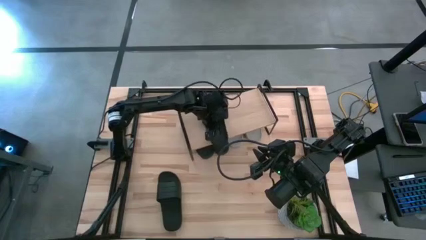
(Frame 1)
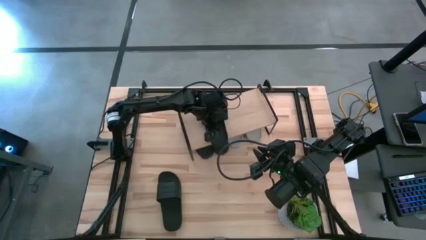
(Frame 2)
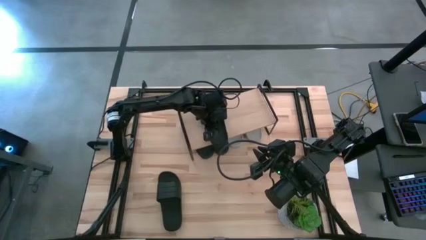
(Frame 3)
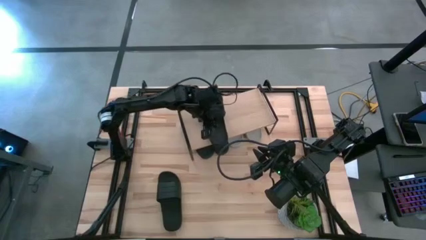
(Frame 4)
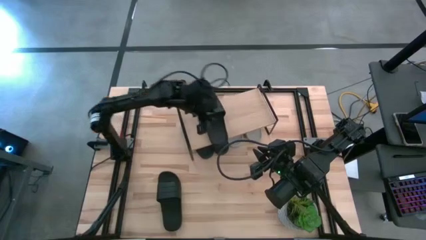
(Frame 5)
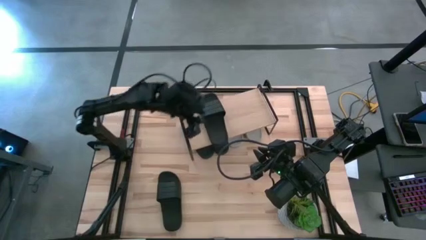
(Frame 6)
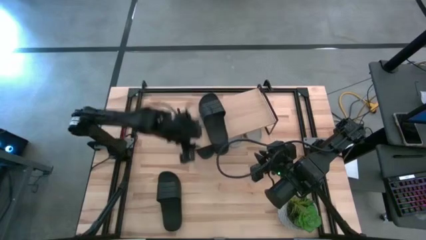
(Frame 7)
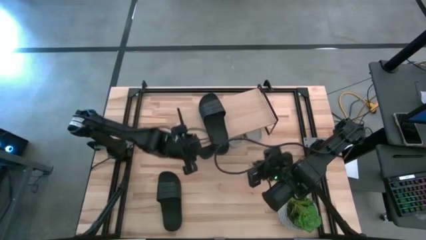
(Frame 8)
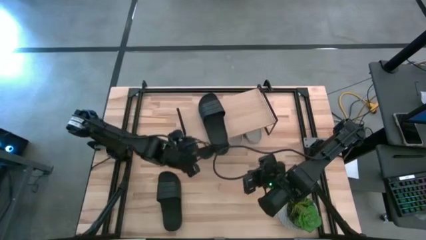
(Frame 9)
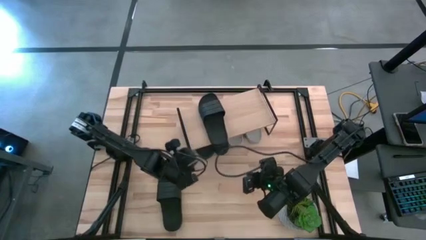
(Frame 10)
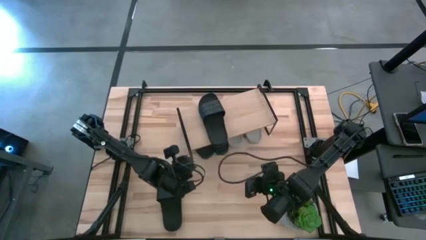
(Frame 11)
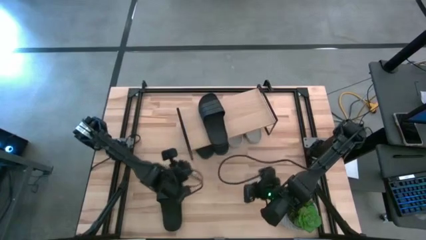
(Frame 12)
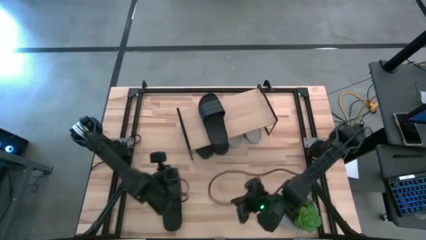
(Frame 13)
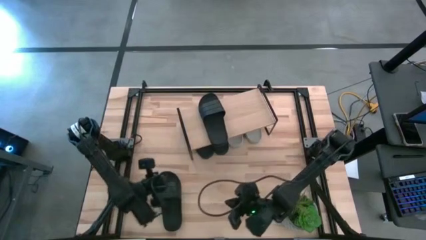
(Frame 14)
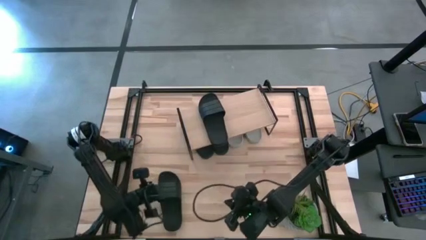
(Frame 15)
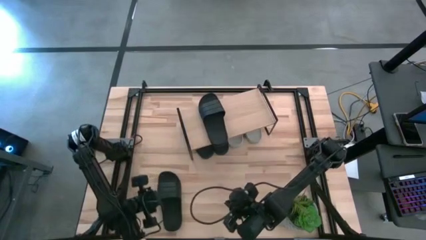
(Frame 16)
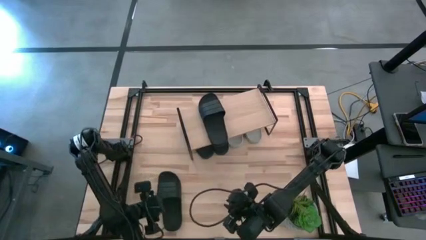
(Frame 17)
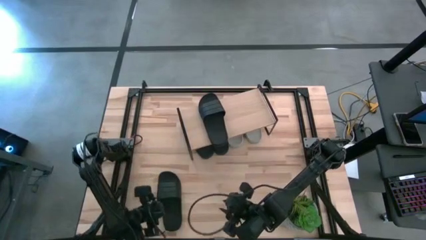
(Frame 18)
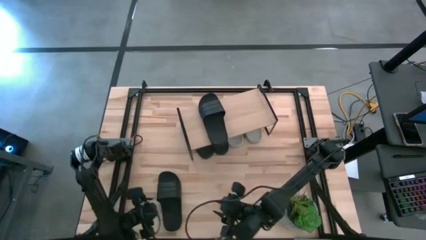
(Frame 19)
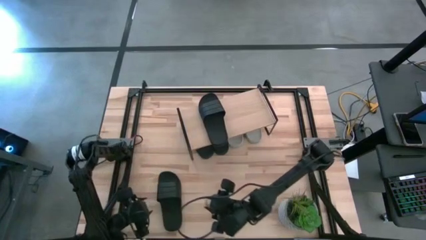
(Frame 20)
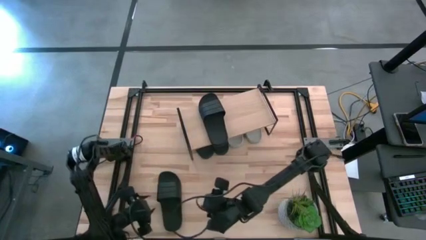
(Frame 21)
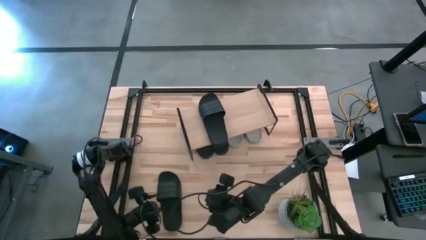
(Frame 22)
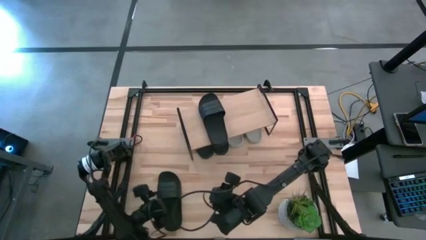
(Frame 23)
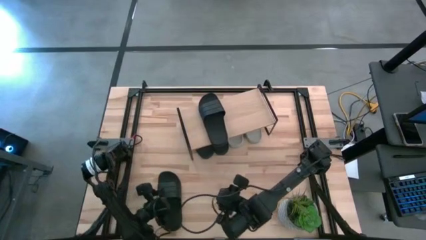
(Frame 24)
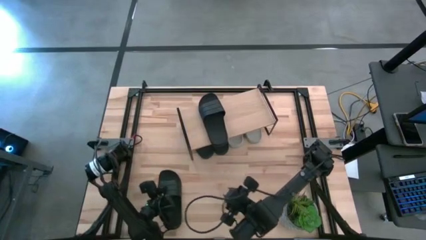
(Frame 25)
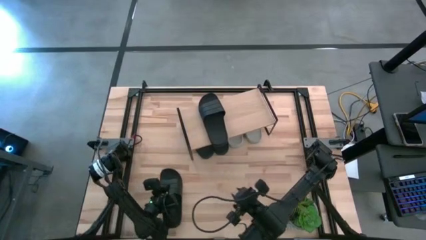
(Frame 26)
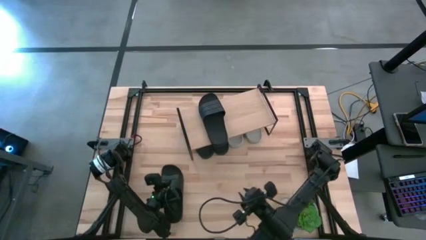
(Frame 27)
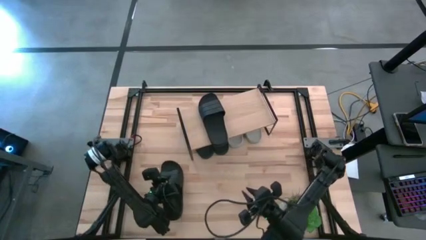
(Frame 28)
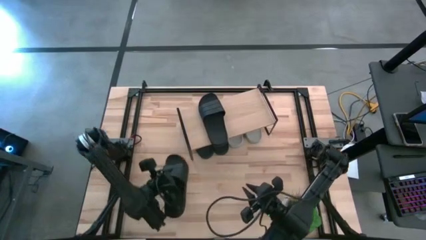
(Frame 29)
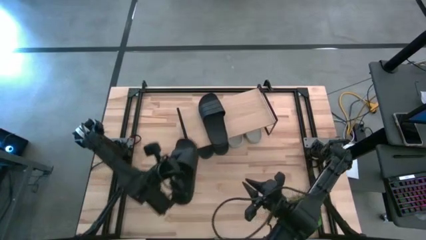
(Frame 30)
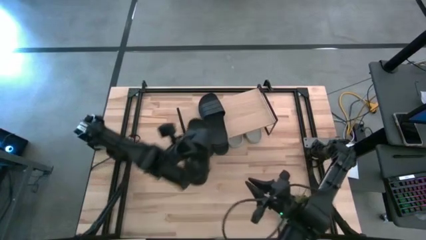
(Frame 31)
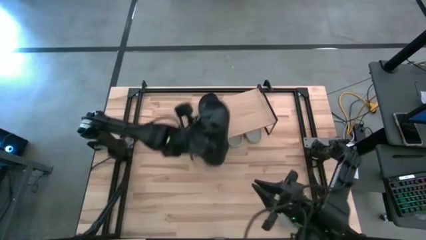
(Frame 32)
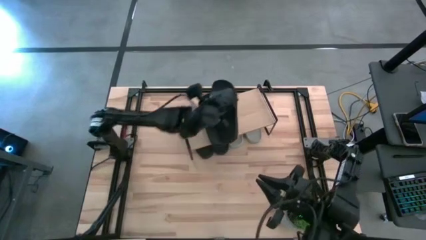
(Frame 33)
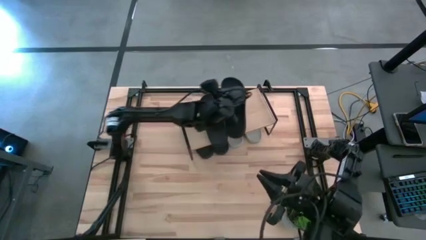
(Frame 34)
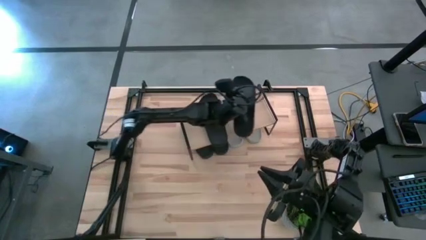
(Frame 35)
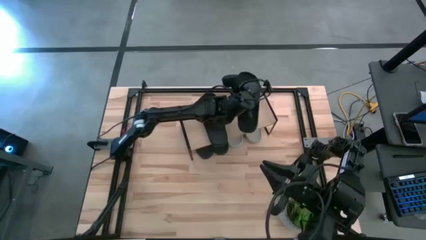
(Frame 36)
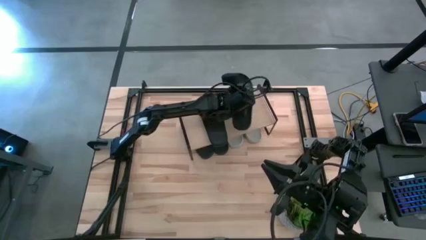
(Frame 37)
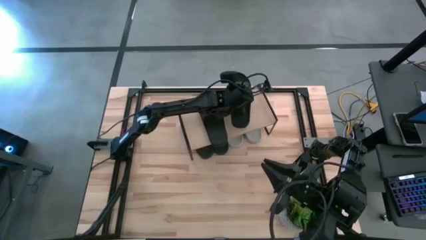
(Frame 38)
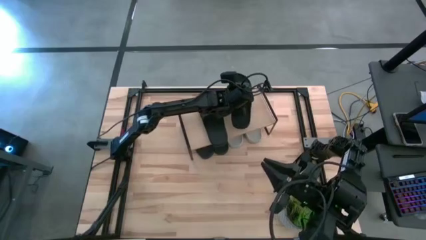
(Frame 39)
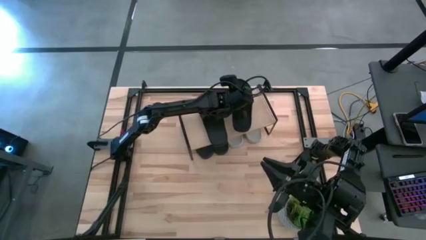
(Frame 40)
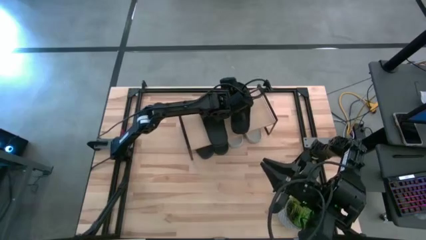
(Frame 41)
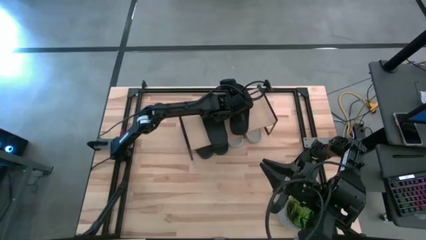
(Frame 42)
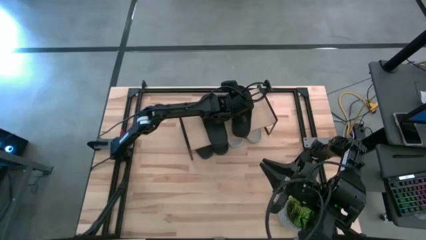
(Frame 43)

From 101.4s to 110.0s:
Task: Pick and place slides into the shelf
Put the black slide on the shelf

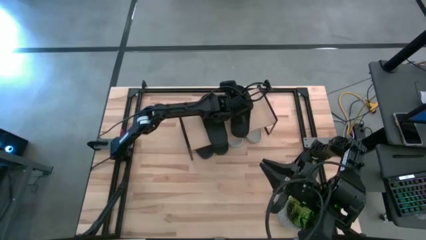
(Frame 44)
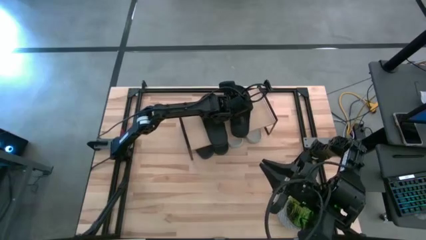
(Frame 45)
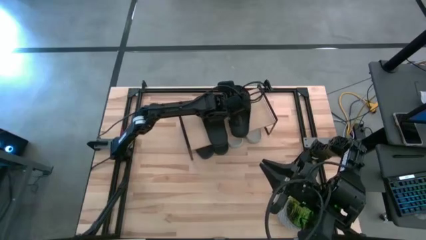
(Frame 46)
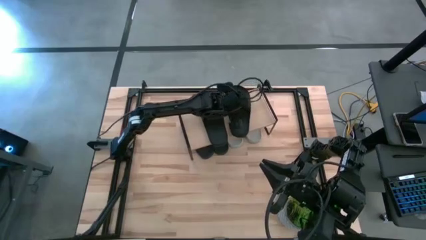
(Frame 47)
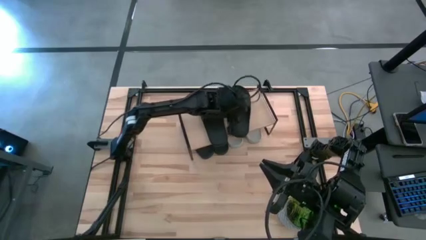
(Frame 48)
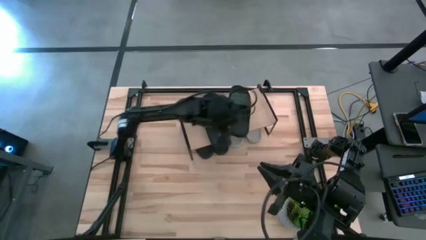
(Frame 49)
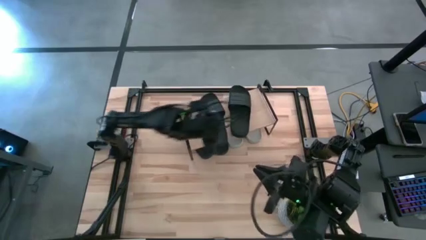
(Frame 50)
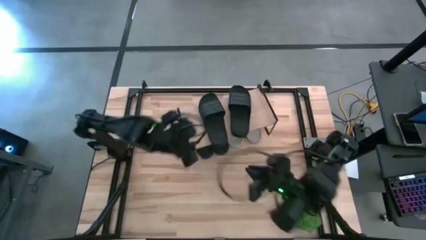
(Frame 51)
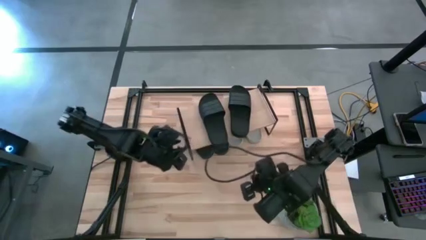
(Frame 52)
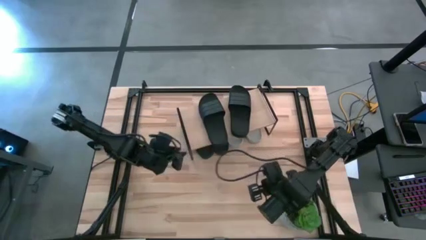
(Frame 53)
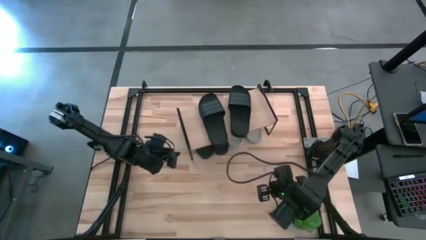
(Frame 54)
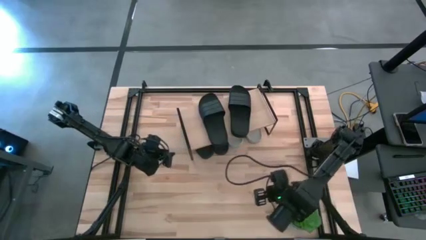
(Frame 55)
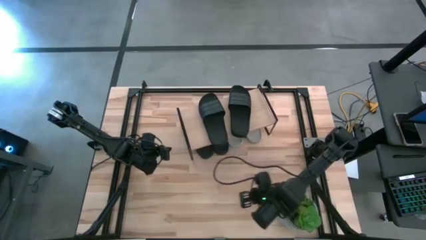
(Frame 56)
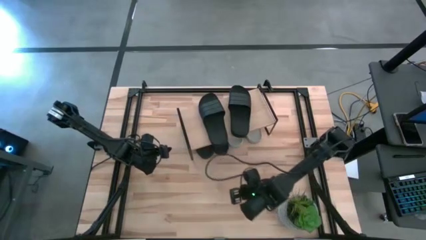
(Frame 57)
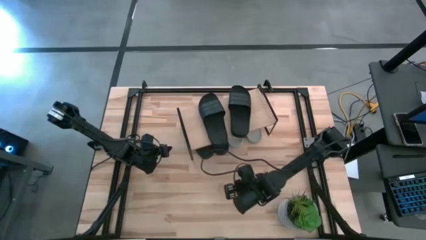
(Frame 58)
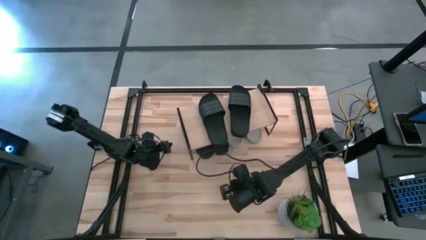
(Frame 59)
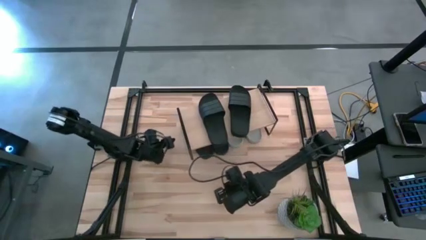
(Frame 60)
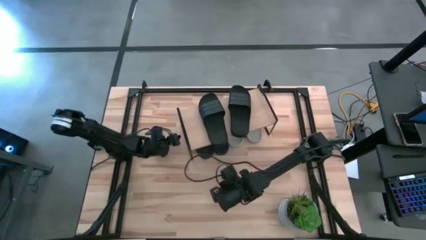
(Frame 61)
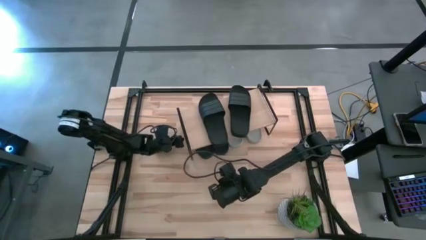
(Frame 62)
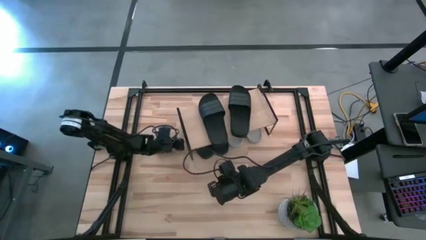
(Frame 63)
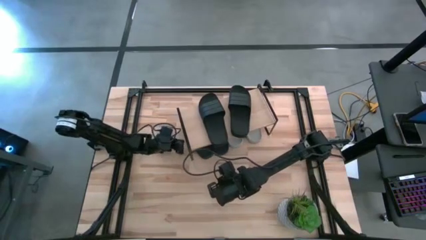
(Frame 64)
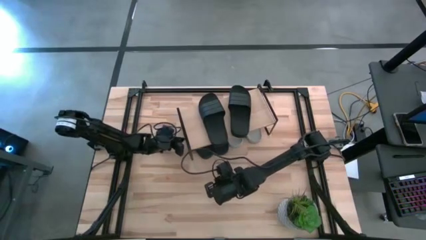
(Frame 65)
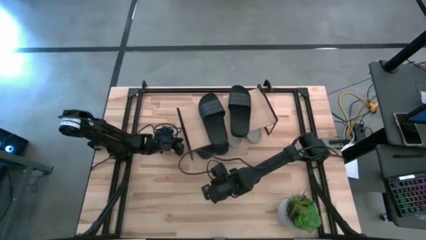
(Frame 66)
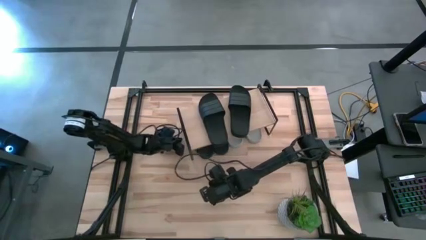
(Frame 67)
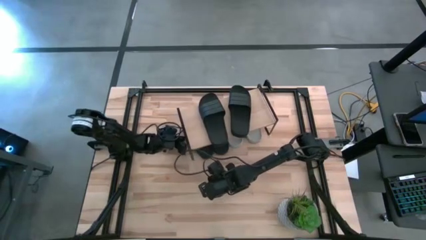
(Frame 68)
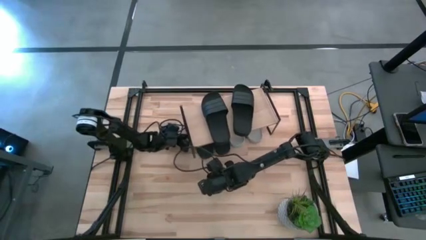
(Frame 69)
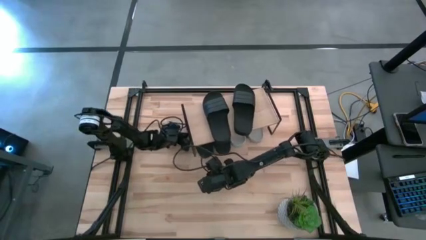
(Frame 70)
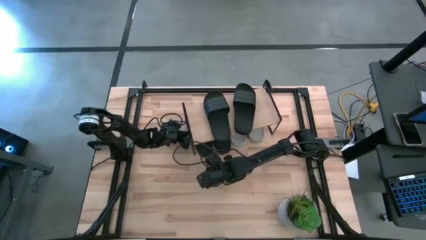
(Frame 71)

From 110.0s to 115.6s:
Adjust the shelf on the table

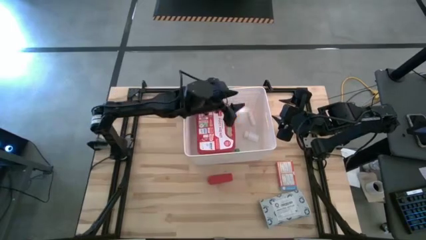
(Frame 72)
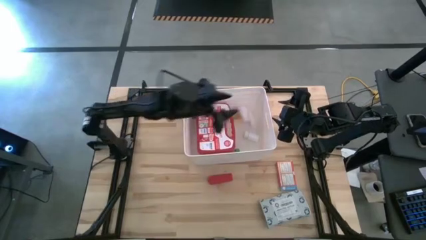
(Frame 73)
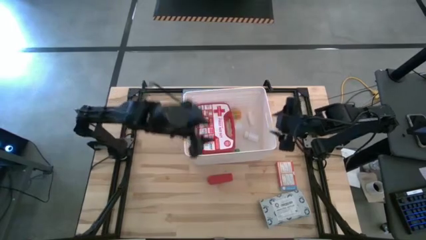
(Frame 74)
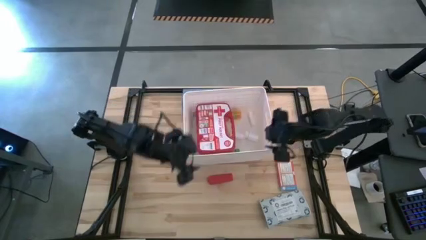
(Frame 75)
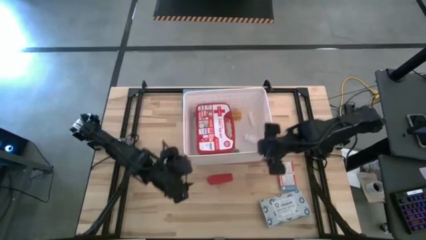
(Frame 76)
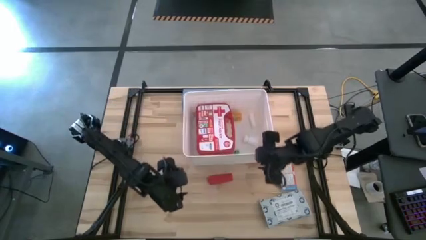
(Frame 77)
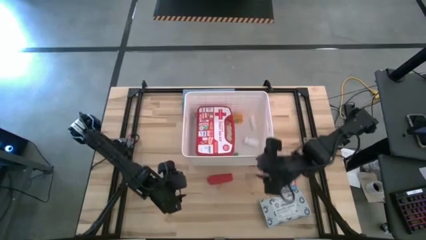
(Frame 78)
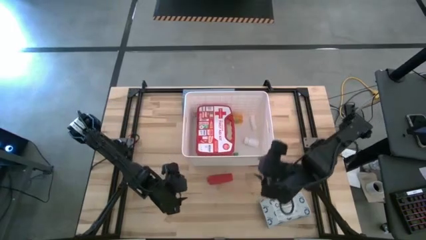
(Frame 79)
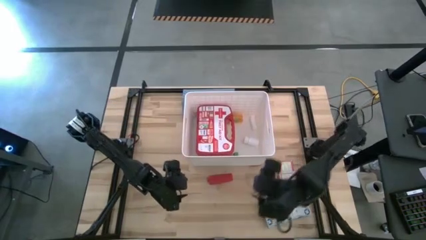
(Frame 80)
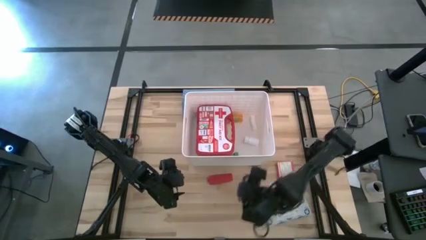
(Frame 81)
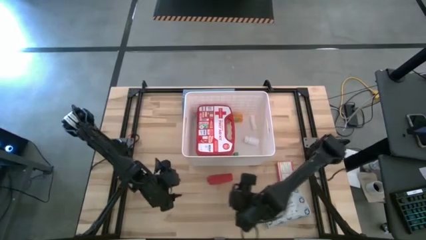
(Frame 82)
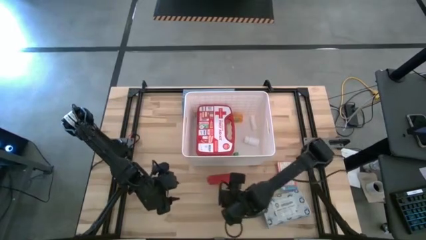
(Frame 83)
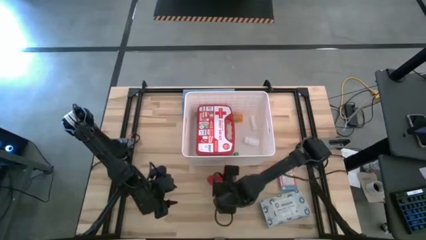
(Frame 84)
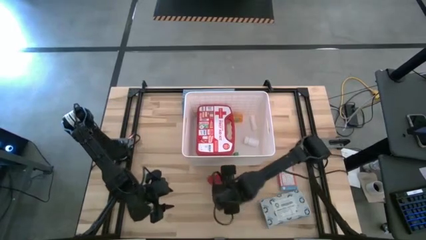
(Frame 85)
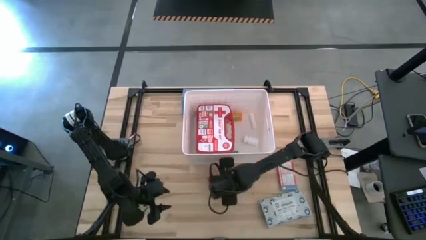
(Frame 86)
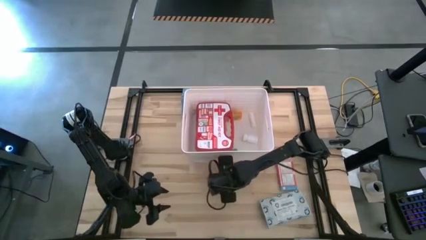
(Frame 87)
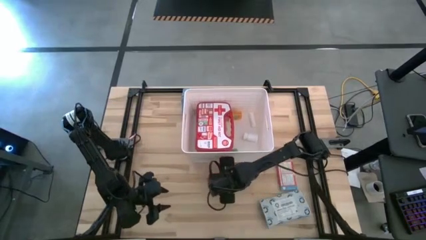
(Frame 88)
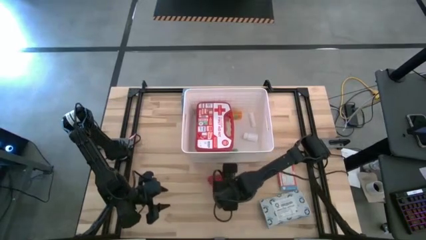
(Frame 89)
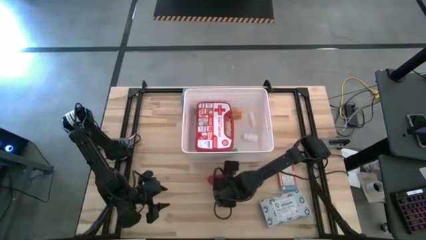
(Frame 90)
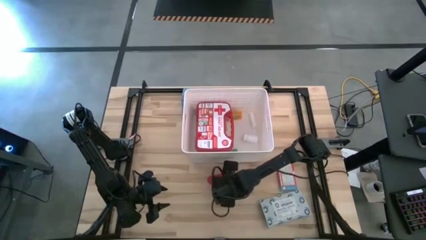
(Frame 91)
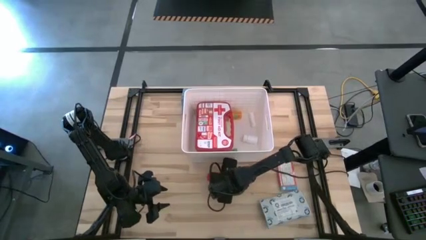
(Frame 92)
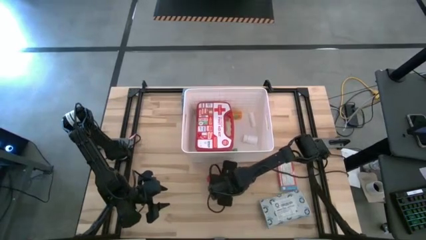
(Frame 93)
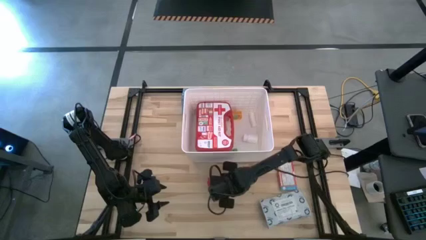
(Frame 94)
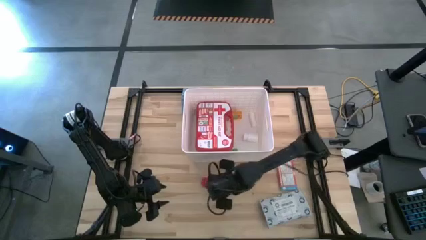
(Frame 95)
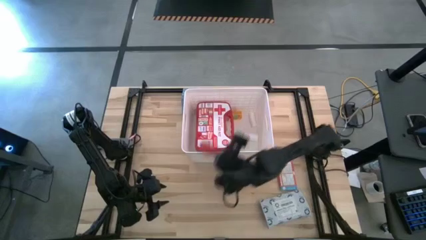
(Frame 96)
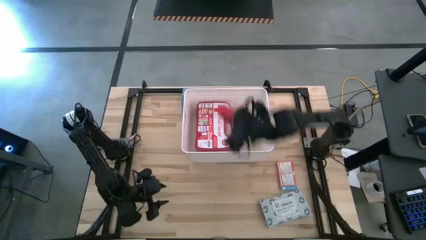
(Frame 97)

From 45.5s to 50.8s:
Task: Pick & place medical supplies in basket/bin
Put the red bandage into the white basket
